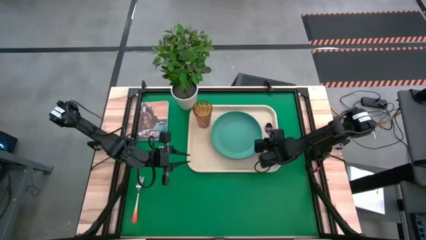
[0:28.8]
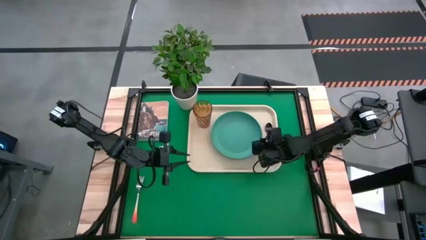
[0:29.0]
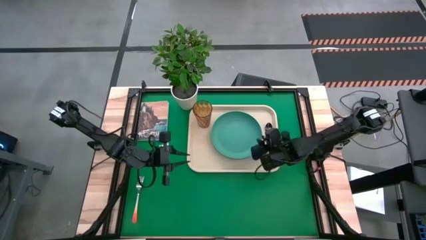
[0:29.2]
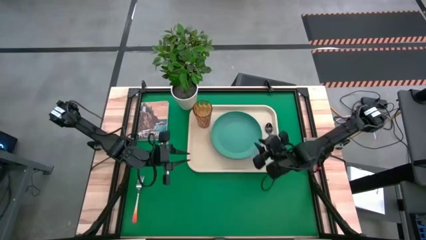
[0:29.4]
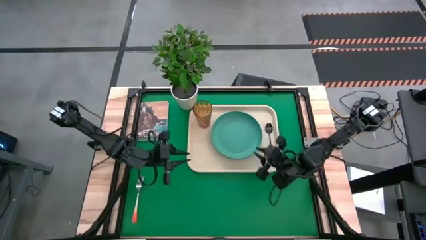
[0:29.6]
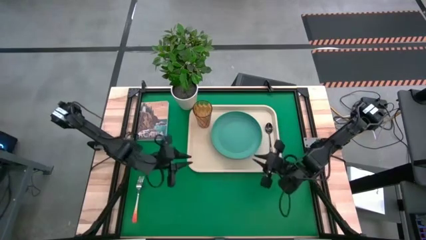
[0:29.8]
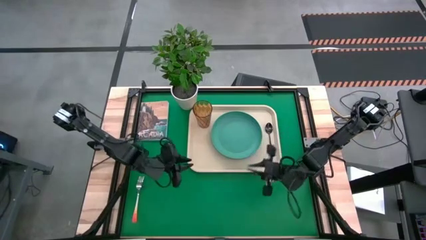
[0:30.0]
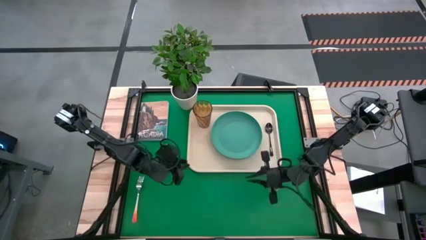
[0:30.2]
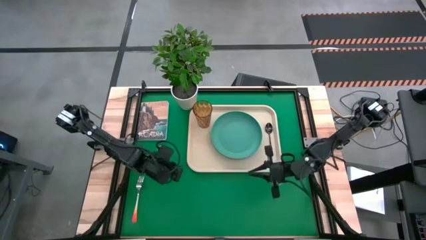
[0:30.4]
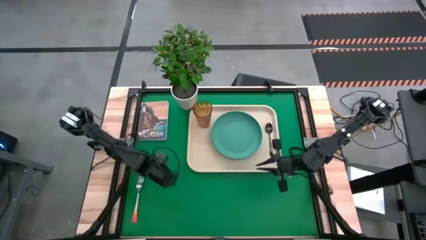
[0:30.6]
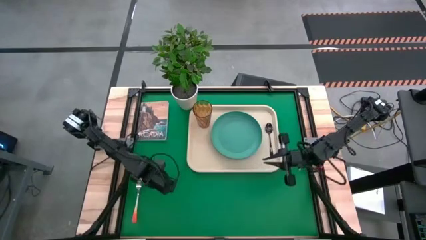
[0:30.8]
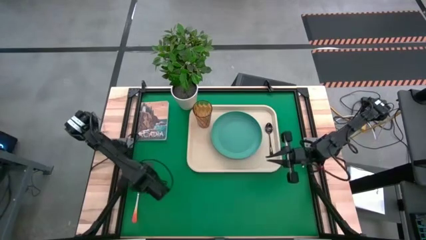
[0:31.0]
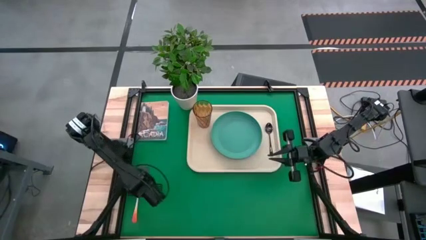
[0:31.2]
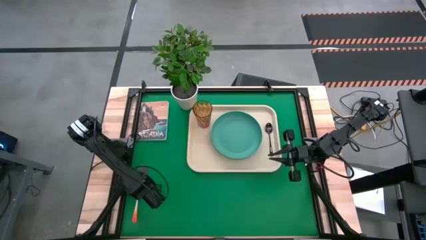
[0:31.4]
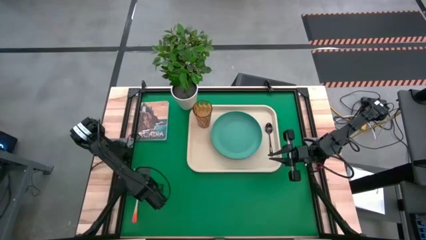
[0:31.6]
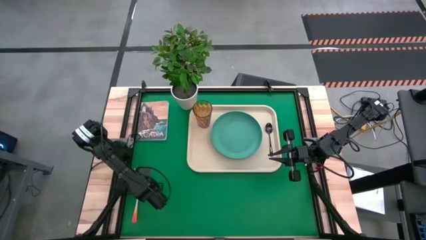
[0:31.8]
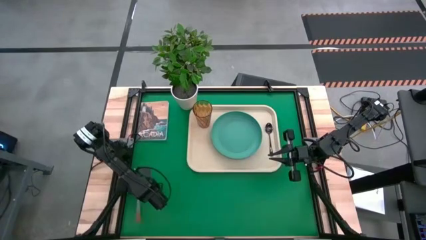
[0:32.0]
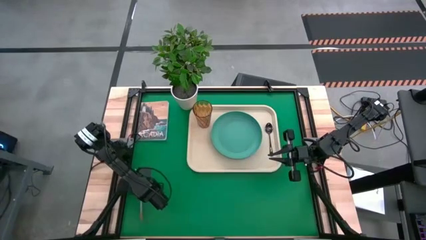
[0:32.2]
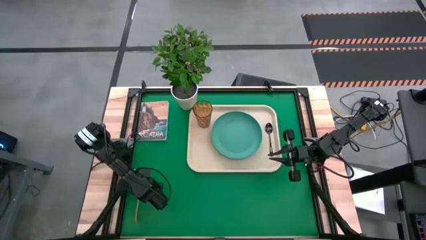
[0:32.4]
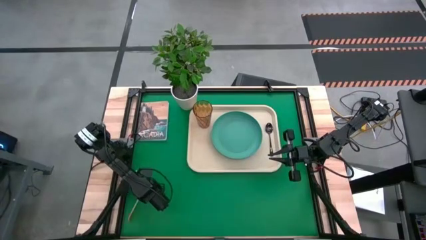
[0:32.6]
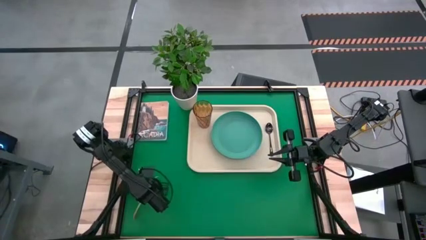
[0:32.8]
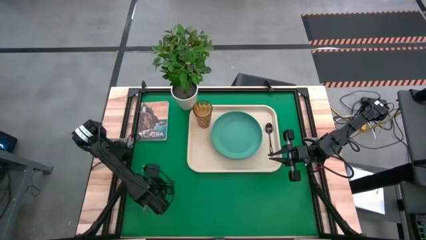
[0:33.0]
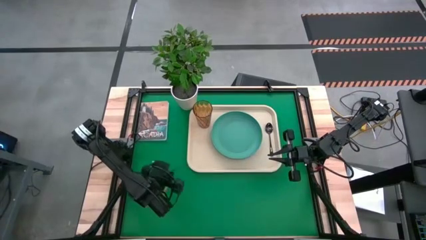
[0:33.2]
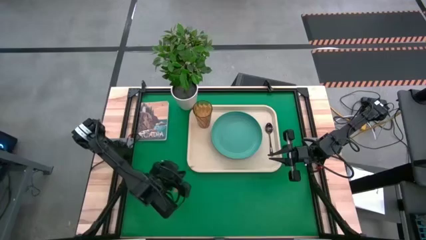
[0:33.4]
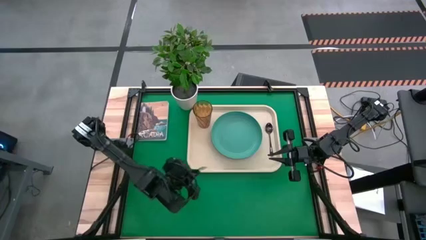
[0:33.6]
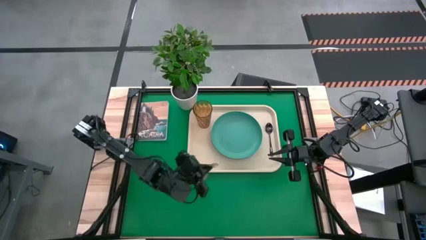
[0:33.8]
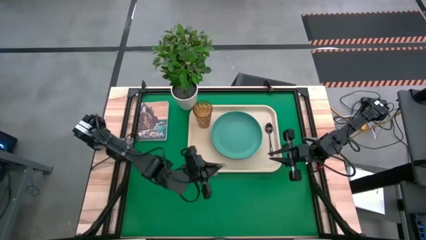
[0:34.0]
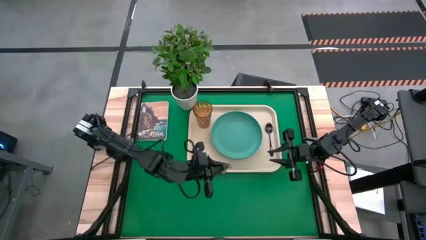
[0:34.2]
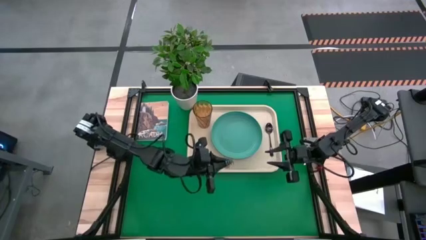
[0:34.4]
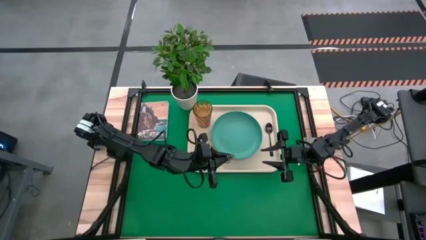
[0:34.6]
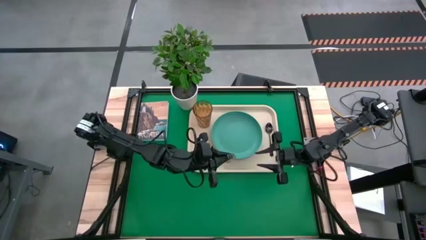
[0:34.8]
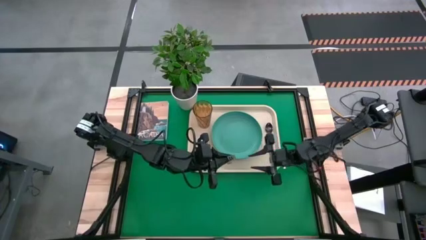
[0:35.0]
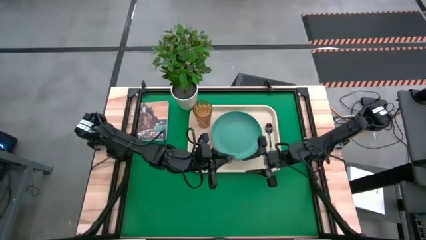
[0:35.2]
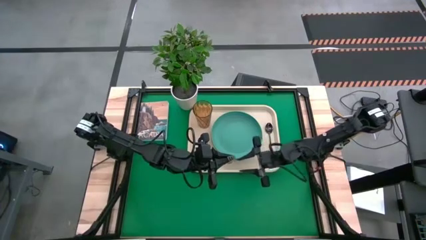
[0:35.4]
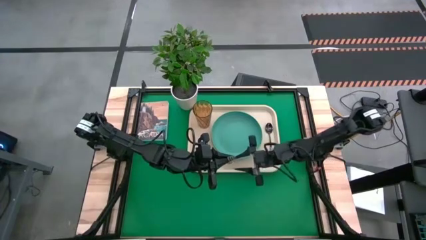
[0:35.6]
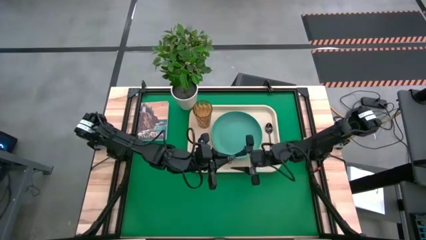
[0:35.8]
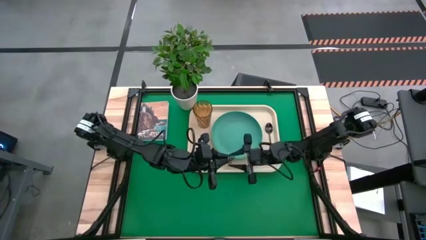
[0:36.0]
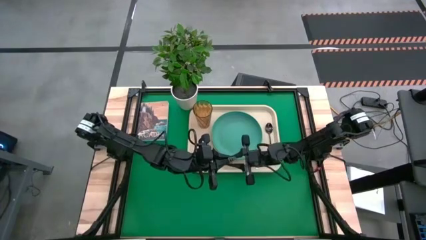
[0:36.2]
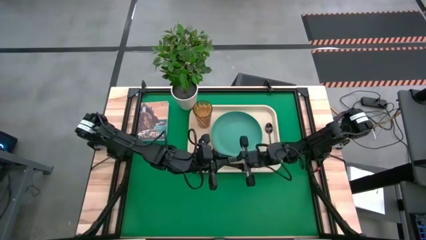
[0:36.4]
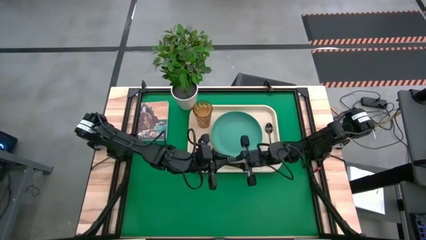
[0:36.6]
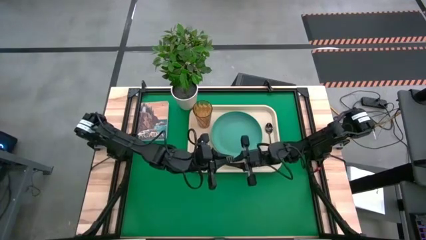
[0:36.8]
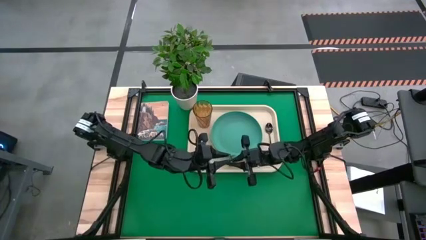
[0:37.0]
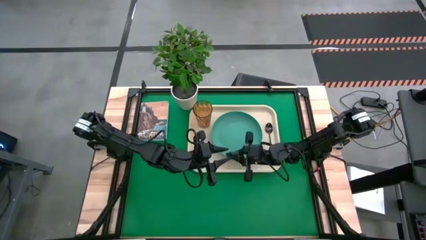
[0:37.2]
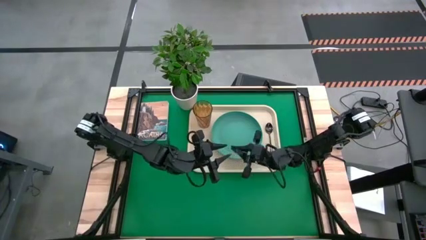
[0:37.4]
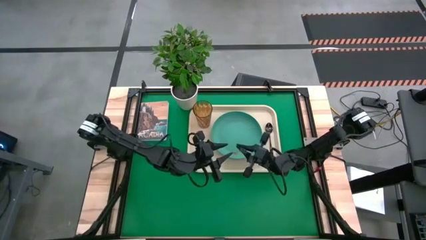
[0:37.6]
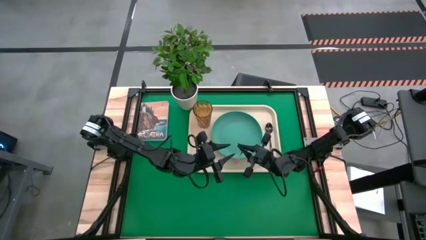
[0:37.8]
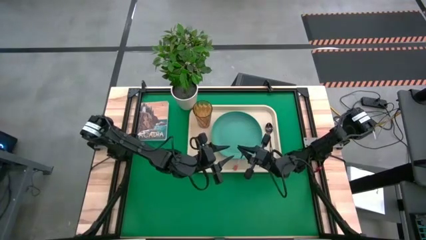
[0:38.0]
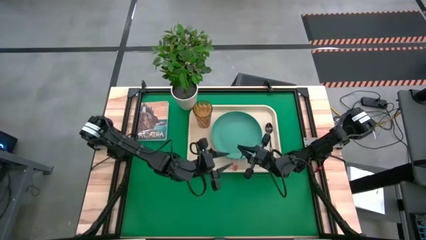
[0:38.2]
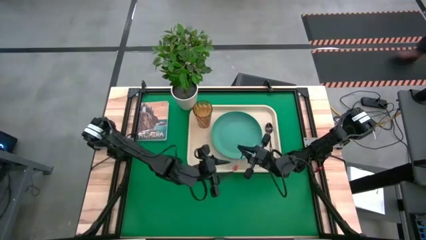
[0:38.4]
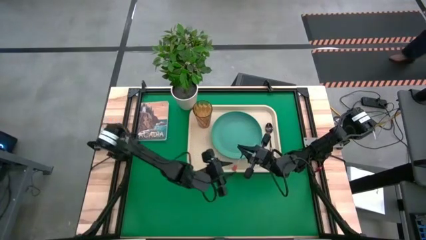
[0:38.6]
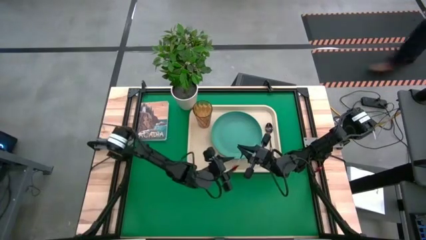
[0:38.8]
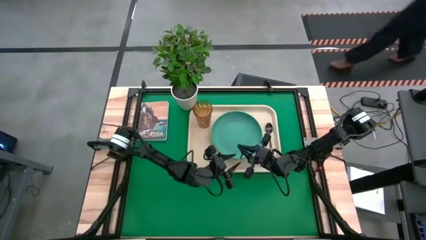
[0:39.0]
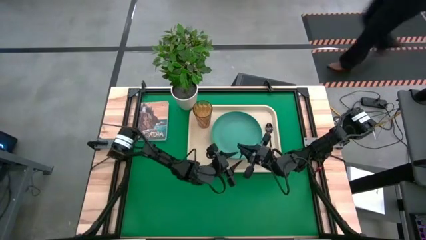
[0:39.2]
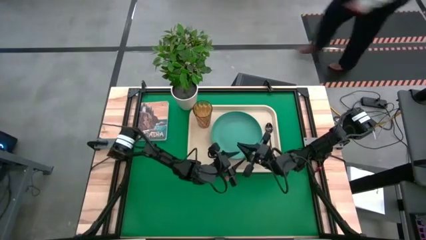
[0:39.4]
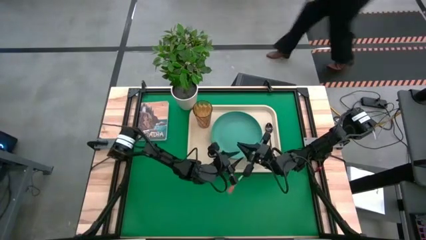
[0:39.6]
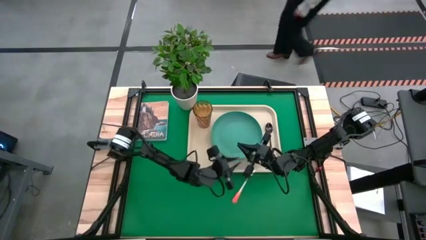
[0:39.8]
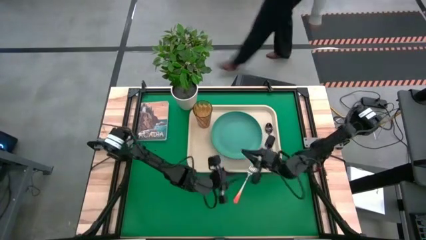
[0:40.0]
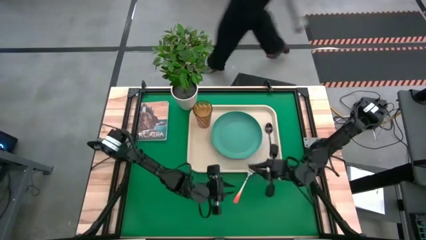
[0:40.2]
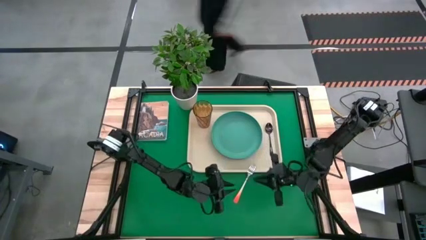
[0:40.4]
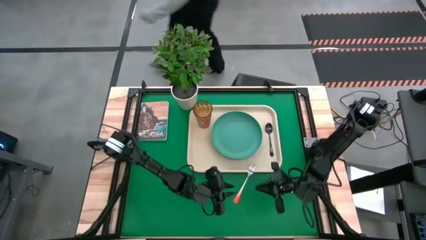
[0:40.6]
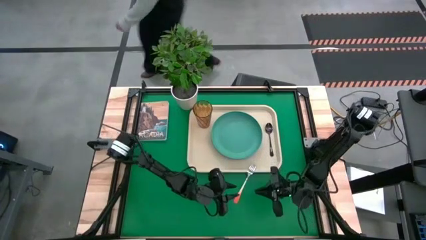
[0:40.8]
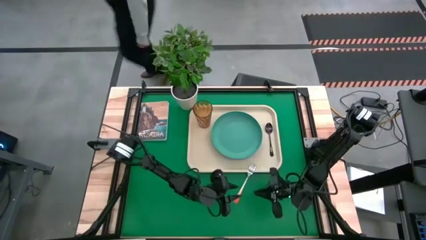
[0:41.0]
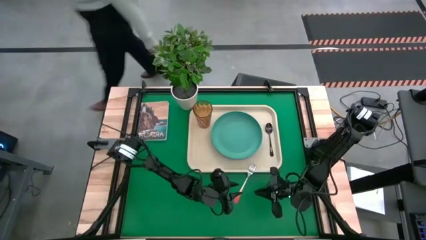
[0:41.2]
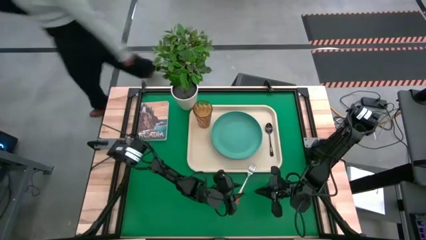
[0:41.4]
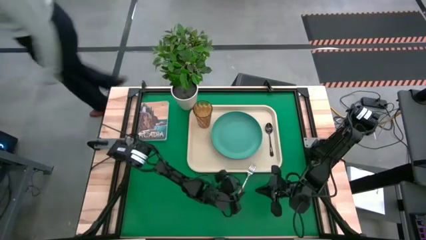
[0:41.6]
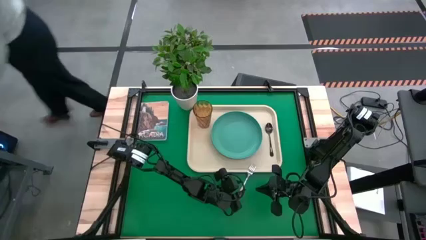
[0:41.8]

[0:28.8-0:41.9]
Task: Pick and place plate/cup/fork/spoon on tray
Put the orange fork on the white serving tray beside the blue plate

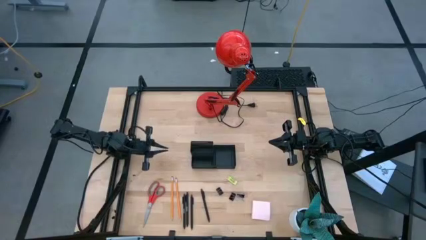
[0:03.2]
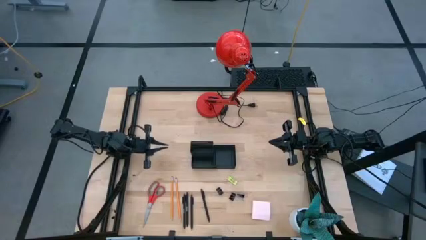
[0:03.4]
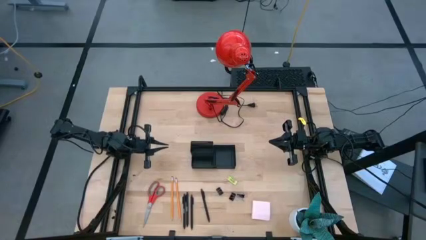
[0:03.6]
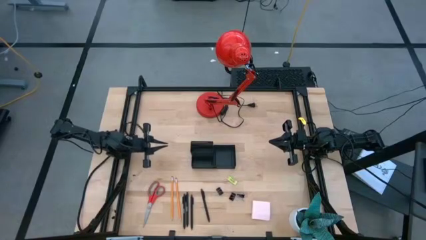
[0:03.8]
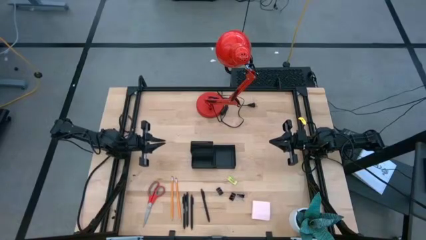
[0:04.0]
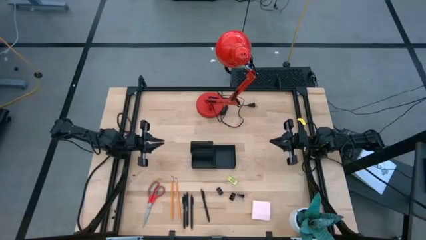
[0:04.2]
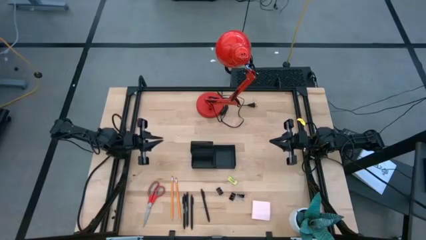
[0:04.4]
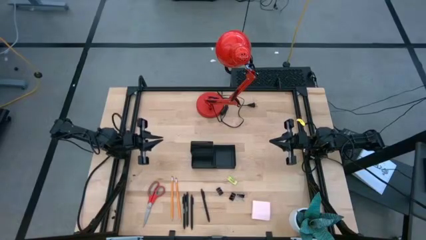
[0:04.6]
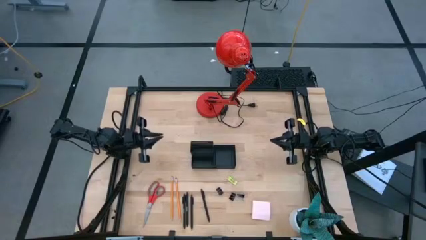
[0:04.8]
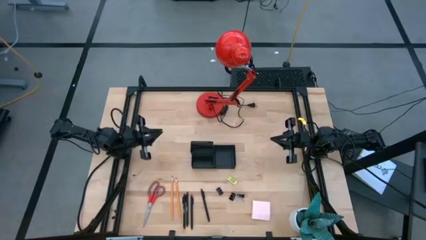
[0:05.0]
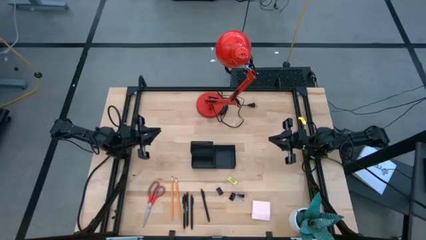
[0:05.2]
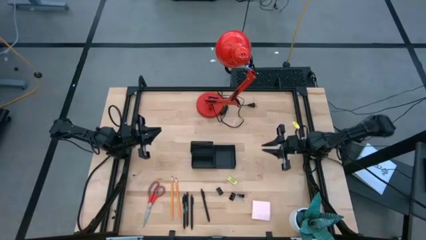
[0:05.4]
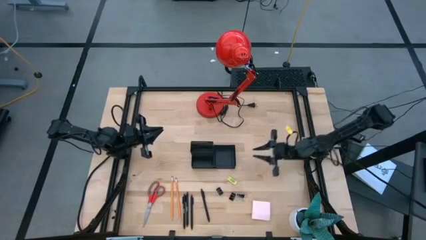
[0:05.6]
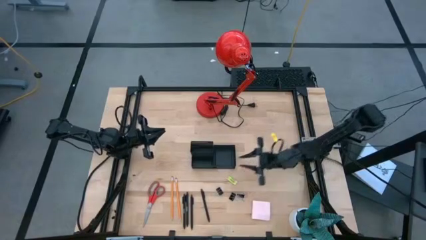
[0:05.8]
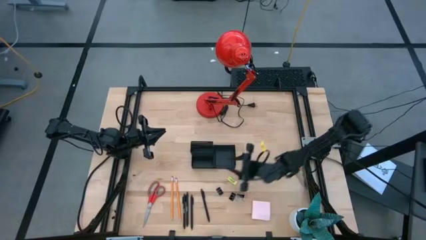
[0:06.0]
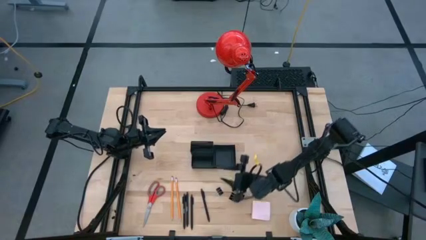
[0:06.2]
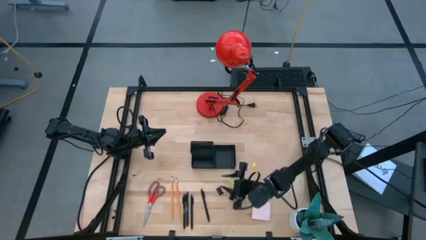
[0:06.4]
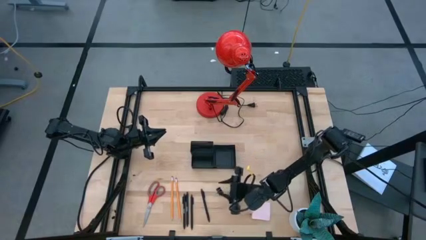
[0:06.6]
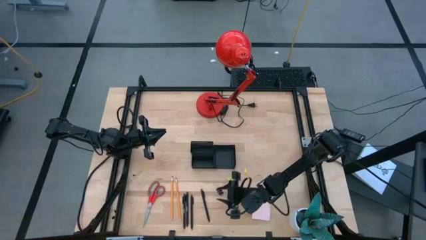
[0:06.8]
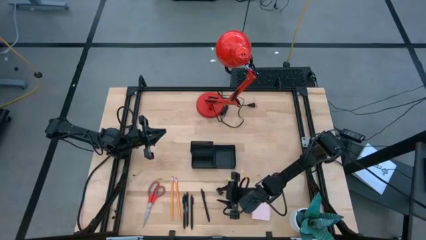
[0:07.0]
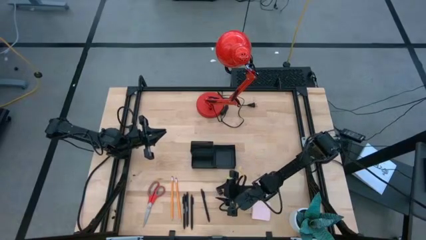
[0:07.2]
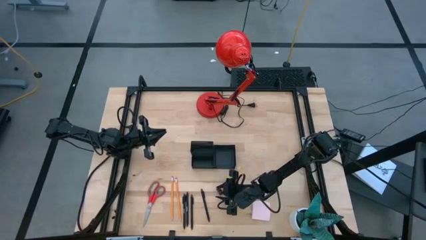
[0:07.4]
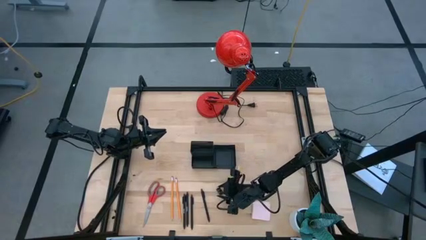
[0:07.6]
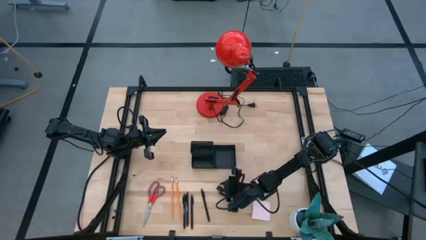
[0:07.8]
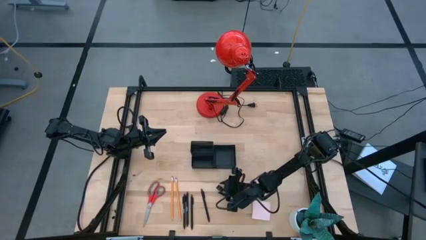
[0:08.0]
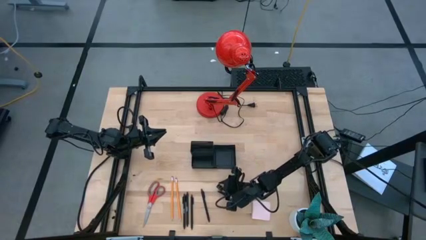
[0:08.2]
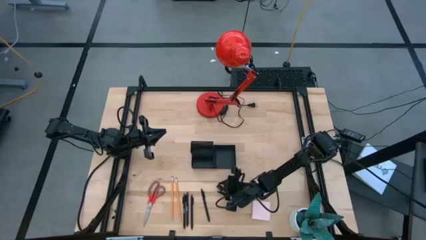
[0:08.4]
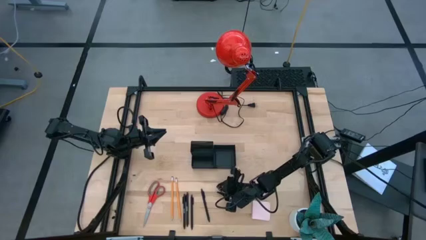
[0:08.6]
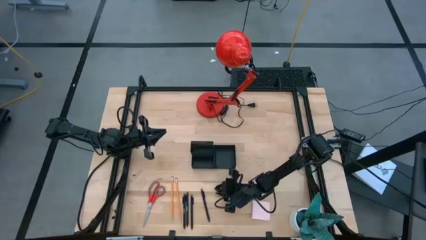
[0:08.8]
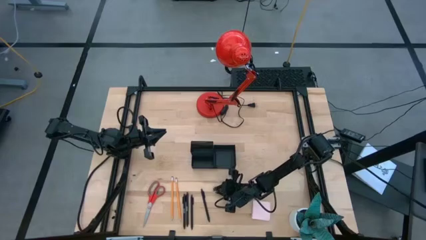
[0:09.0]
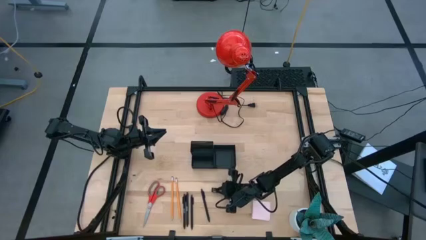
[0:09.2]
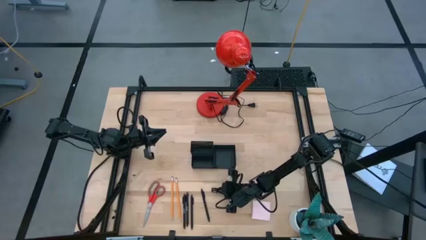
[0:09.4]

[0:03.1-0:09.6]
Task: Pick and place office supplies into organizer
Put the black binder clip into the black mesh desk organizer
